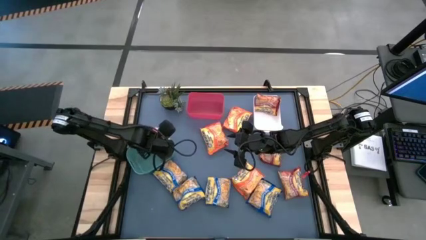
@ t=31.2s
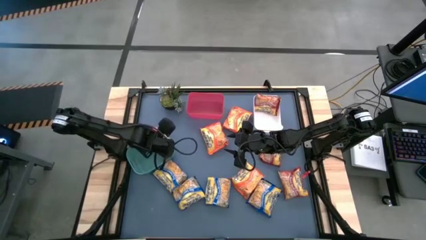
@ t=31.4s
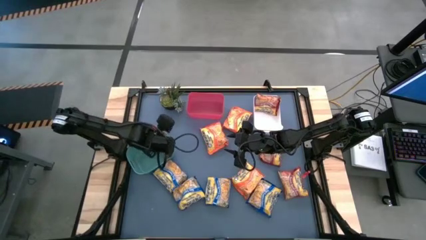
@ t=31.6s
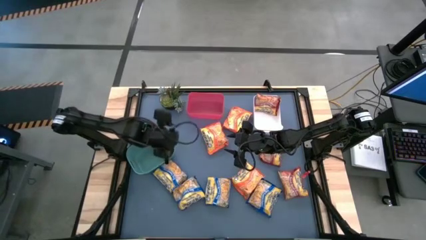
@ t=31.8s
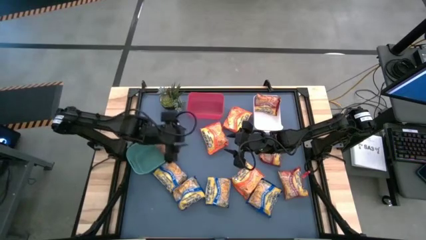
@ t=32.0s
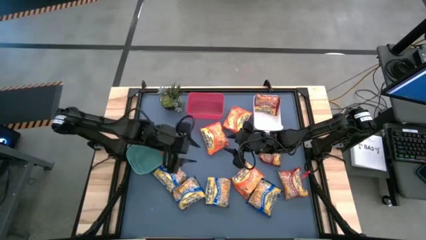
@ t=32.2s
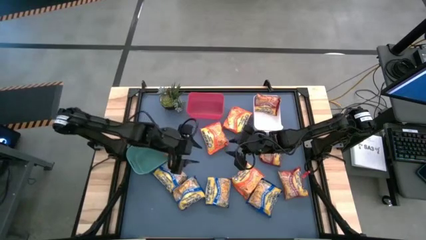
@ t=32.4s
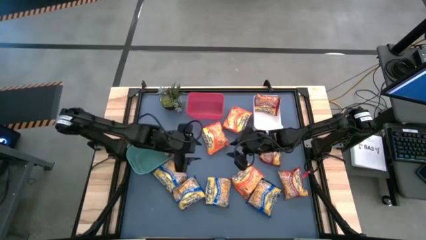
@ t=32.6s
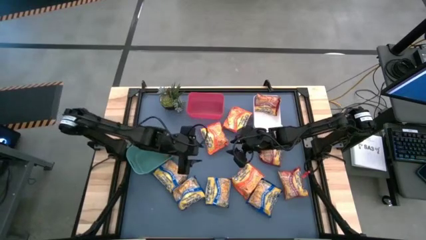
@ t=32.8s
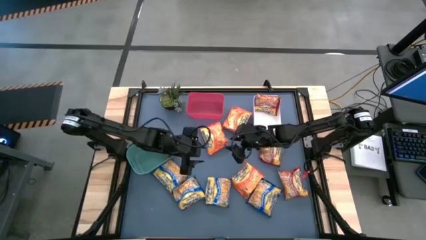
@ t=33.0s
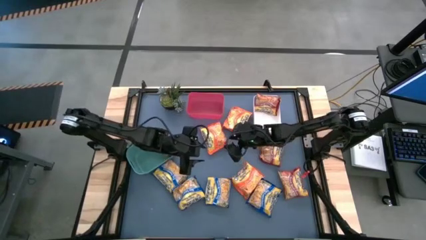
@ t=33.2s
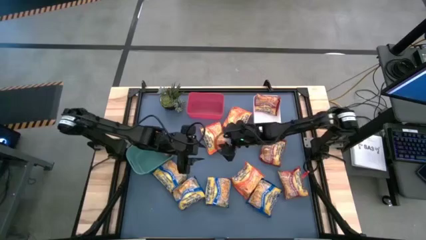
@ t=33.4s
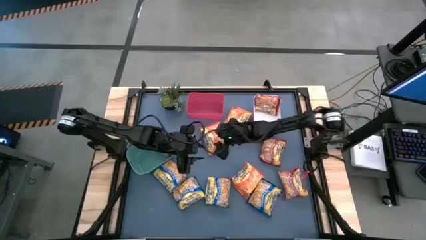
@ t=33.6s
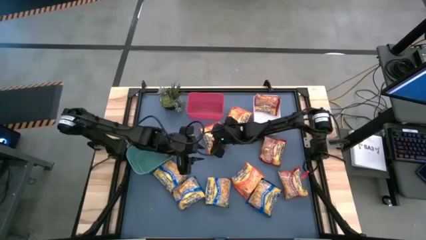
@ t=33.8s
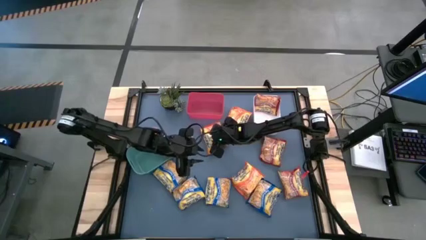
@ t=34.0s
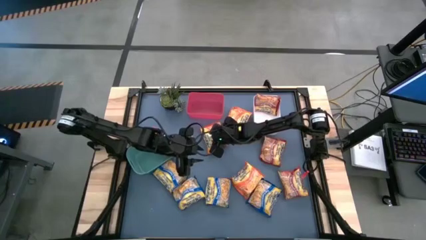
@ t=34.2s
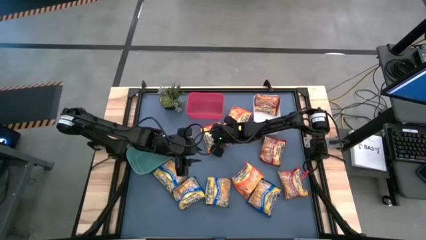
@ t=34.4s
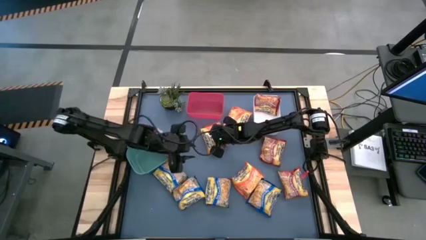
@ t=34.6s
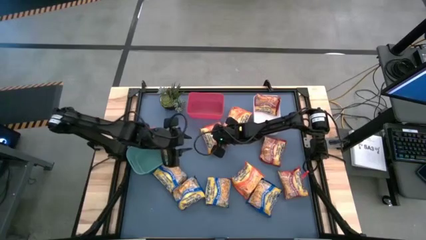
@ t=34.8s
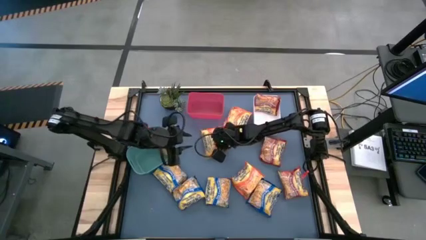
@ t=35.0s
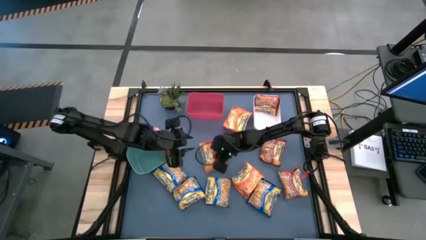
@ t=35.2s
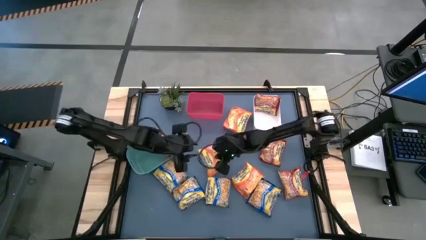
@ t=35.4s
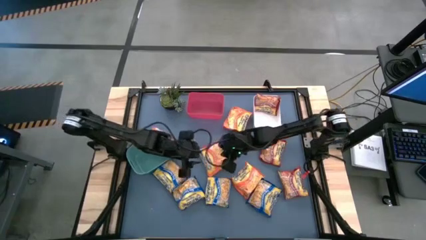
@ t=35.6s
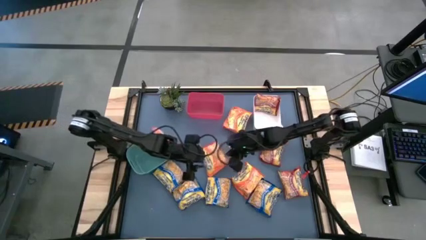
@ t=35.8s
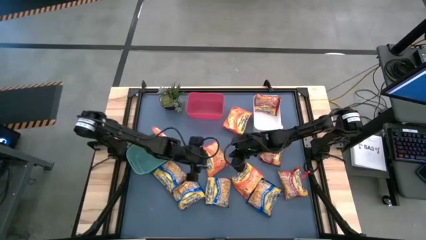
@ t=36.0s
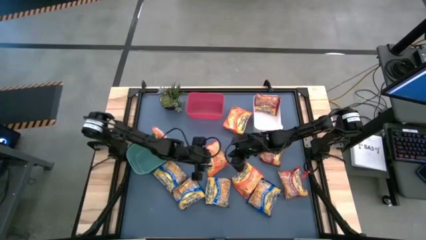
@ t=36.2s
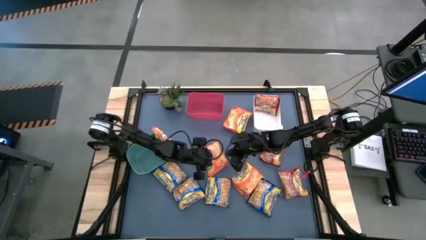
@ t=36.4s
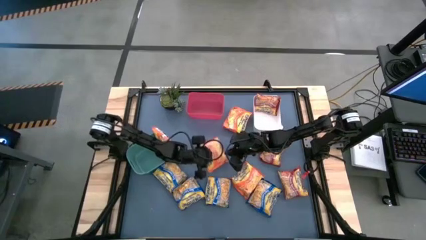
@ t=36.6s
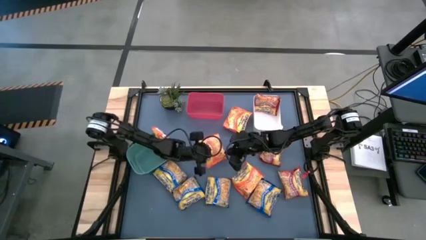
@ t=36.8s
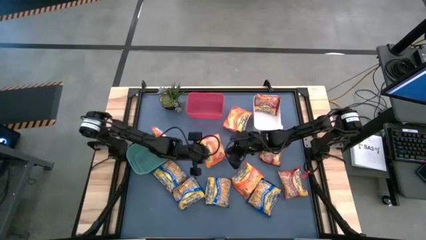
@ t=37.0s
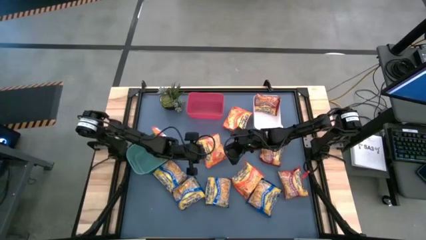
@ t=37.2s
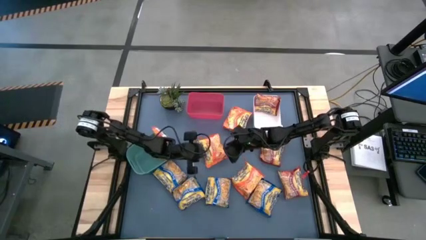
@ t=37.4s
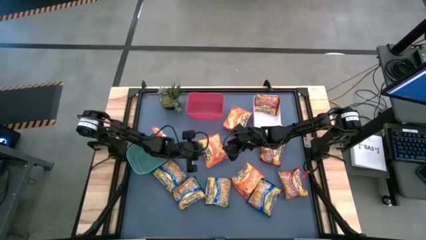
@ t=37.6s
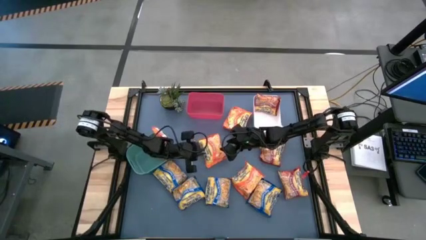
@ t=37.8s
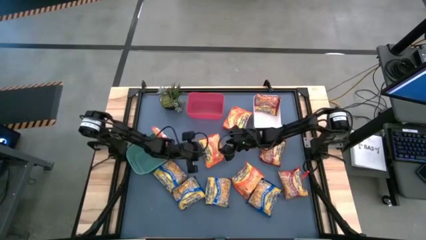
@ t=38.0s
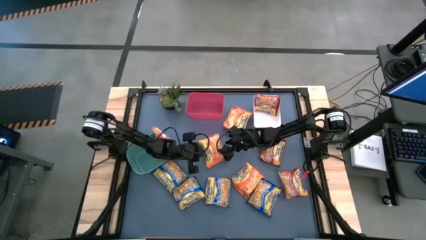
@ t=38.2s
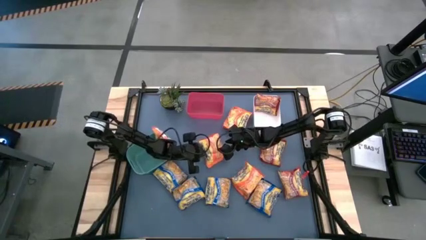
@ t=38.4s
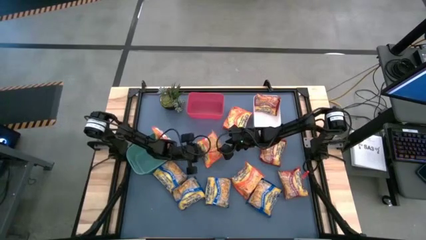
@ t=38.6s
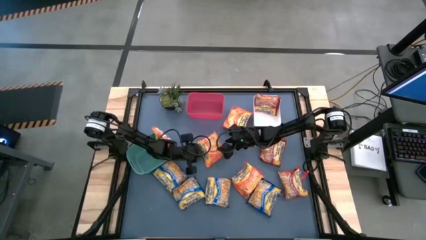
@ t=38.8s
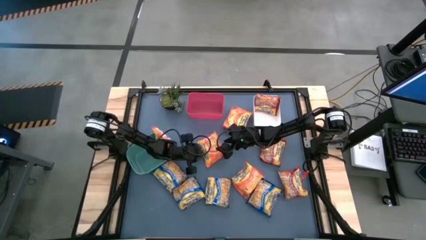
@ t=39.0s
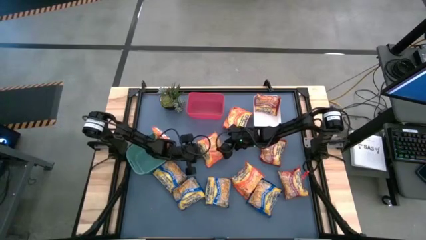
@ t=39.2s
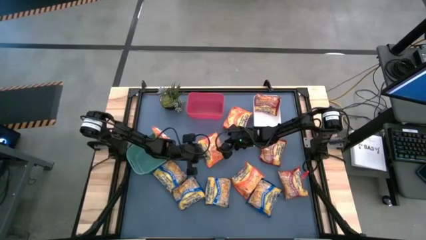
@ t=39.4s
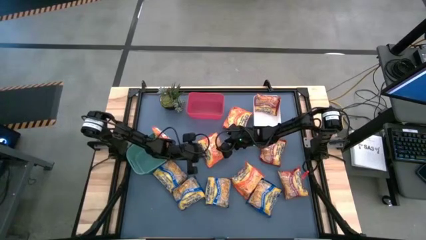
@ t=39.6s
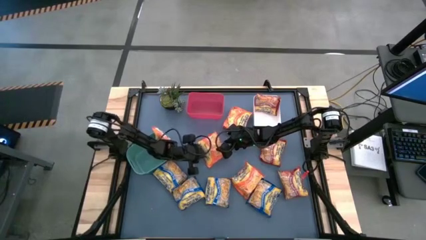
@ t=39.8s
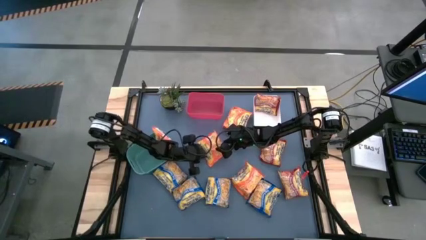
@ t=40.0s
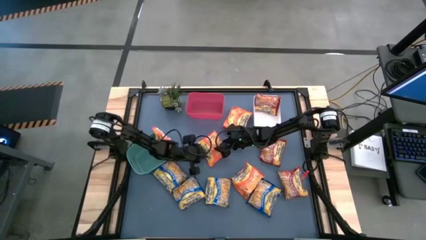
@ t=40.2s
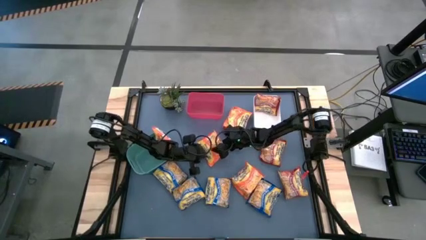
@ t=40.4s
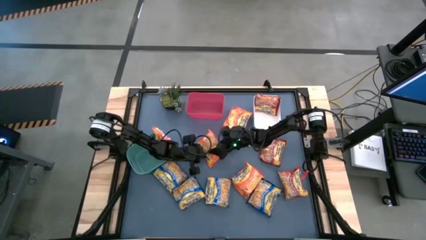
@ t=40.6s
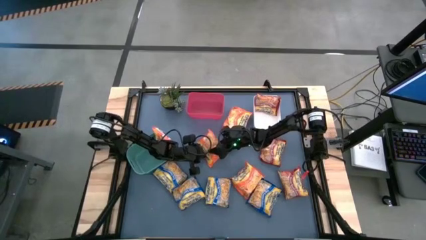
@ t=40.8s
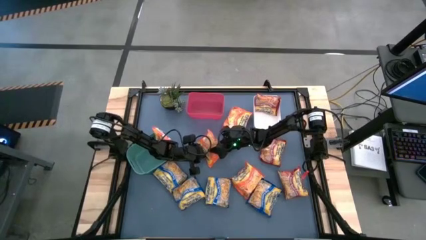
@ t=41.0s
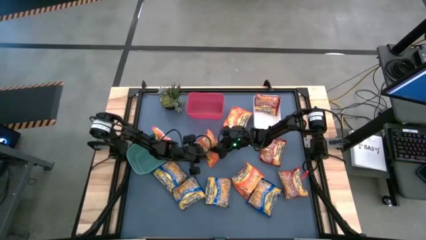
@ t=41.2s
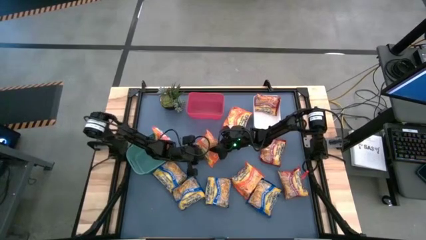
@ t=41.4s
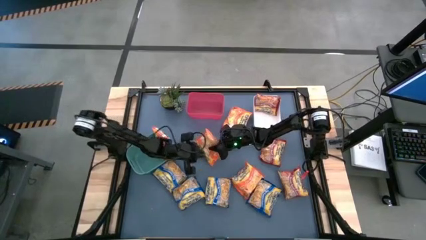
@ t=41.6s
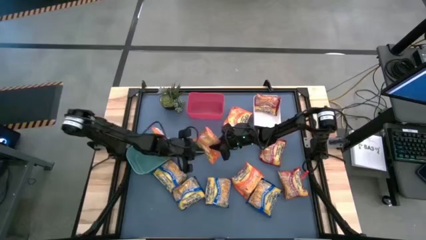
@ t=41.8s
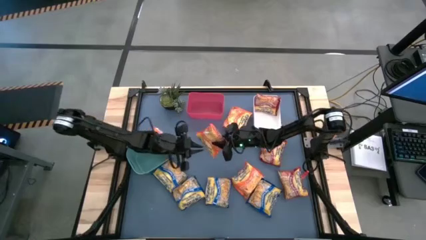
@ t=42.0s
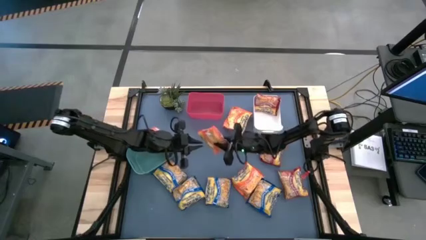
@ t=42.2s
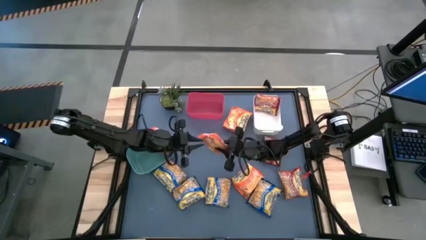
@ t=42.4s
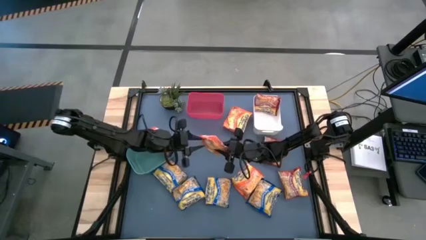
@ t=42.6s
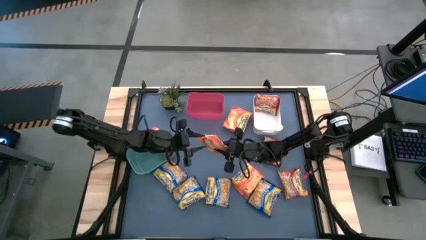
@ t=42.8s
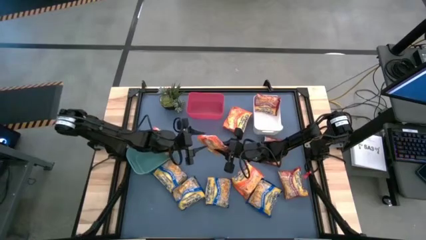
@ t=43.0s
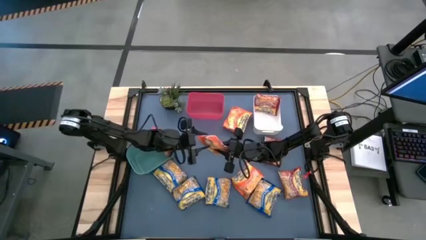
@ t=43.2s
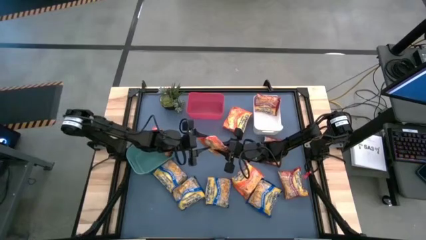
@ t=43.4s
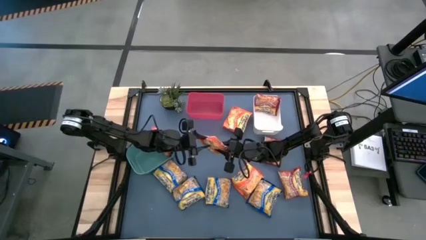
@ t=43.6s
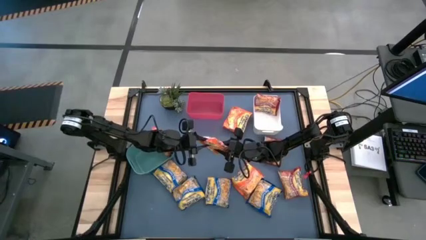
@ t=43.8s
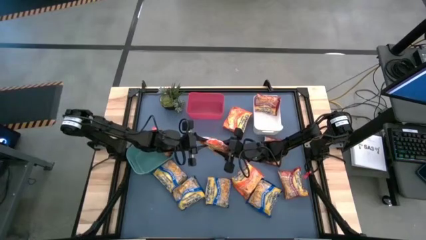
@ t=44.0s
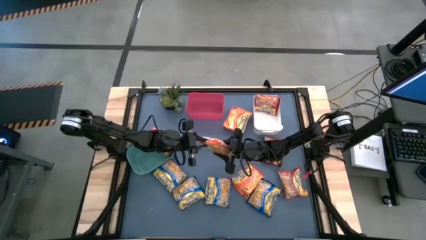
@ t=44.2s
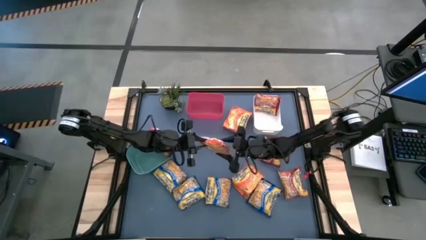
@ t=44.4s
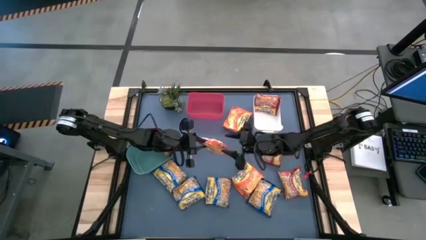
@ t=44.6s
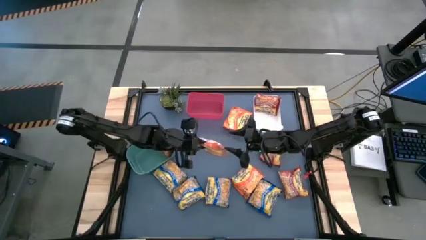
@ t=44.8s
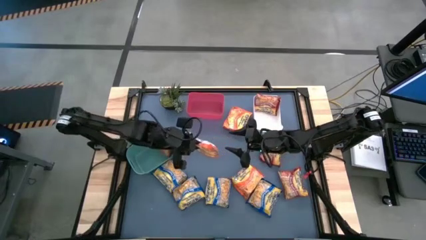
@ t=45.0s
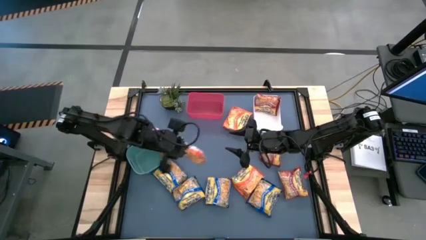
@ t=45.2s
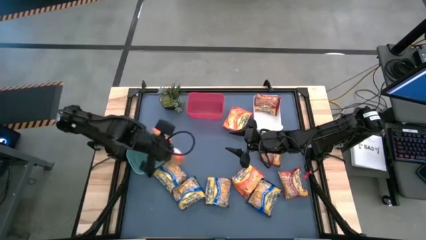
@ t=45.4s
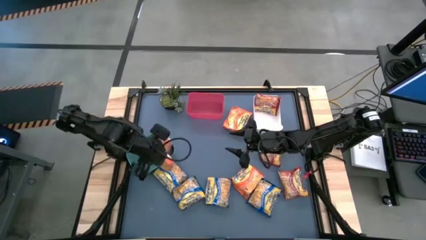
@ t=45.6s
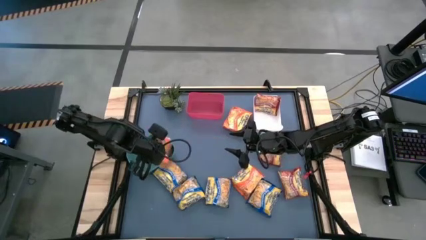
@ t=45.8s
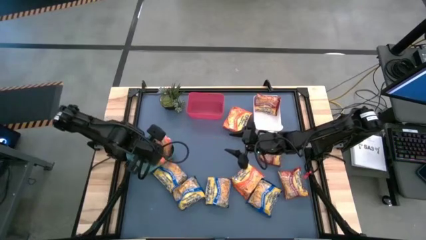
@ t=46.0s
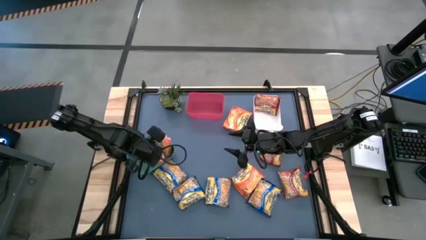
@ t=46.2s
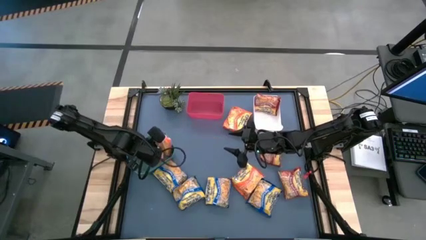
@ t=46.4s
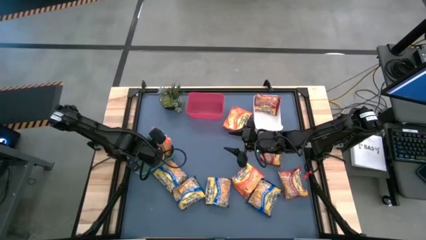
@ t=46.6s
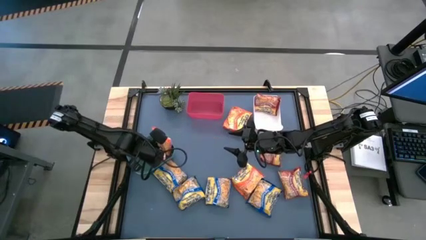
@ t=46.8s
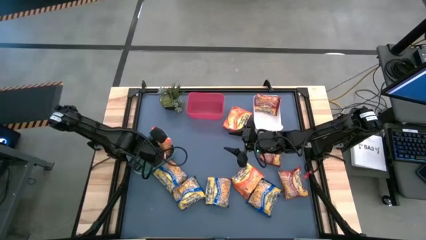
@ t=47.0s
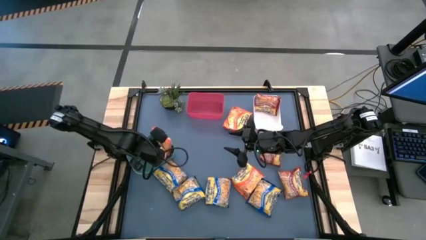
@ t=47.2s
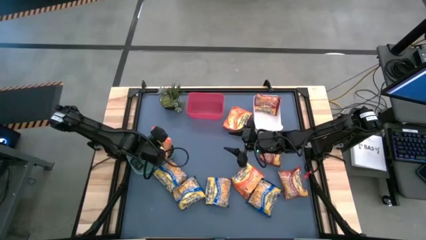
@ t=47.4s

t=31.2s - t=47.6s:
Task: Sort Maruchan noodles
Put the orange noodle pack into the green bin

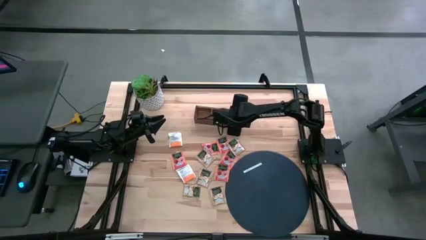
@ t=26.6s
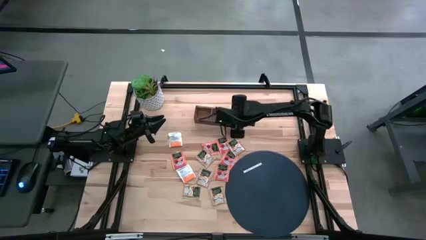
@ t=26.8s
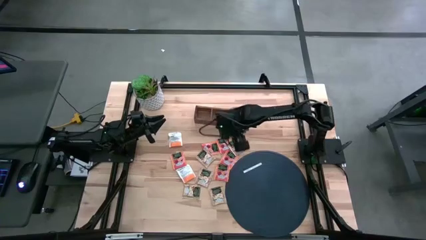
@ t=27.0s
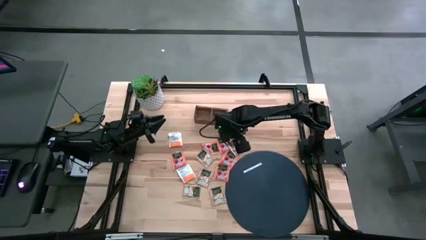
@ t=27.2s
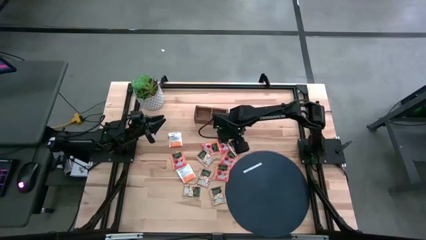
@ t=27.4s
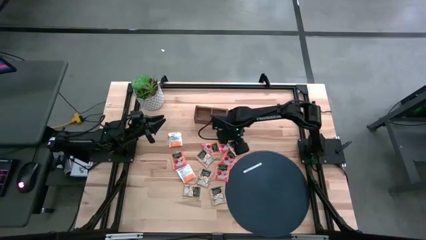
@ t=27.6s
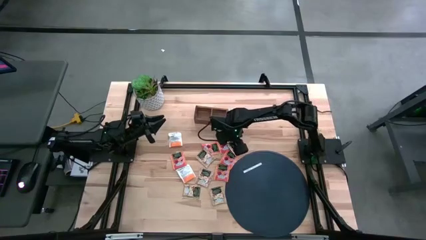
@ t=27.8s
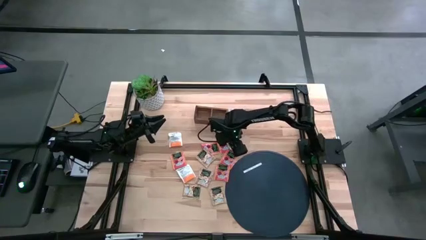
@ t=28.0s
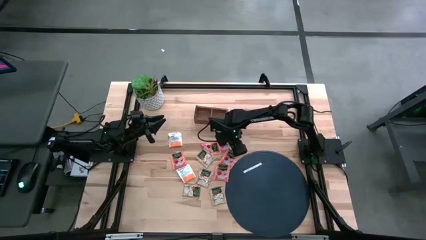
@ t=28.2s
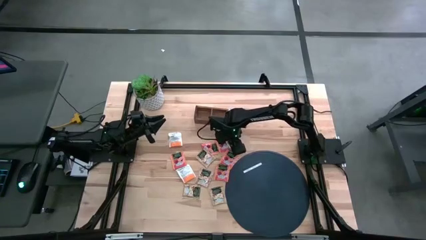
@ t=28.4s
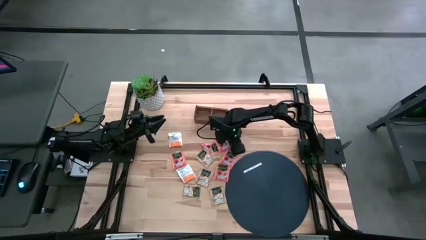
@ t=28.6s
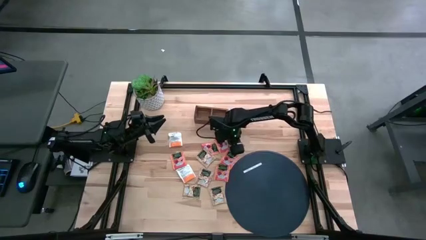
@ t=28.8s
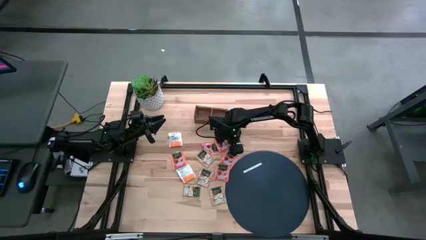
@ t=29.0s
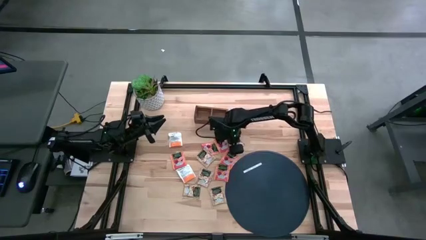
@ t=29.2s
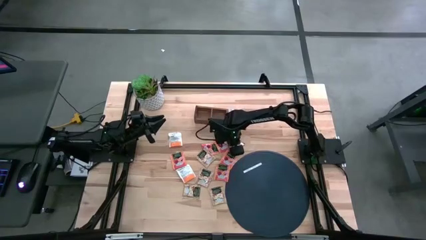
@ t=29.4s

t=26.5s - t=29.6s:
Task: Pick & Place Tea
Put the brown tea sachet into the middle section of the wooden organizer
